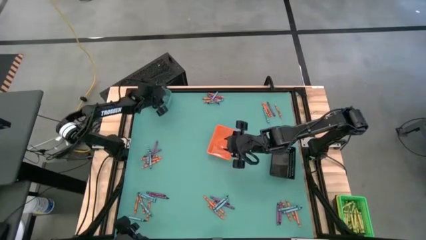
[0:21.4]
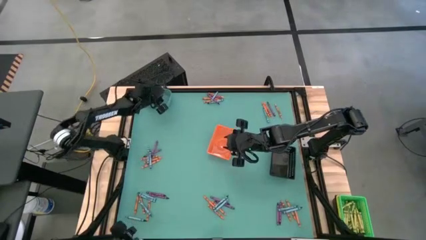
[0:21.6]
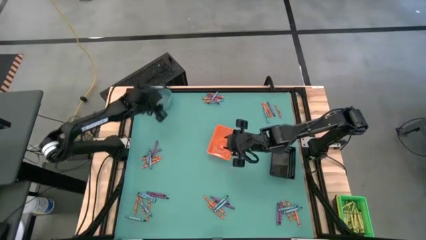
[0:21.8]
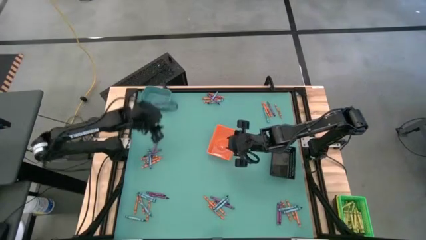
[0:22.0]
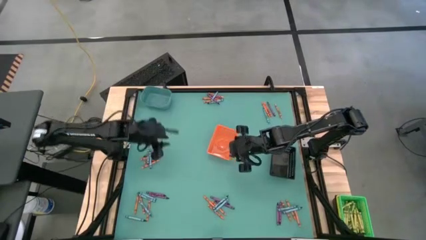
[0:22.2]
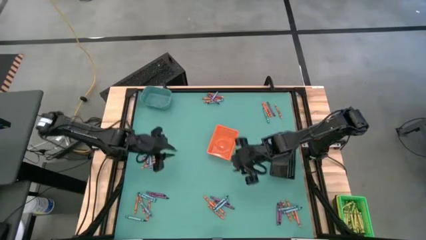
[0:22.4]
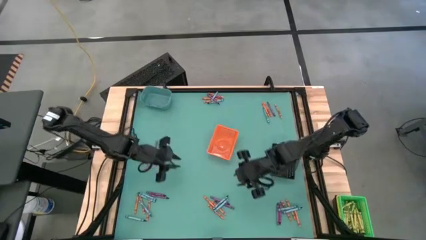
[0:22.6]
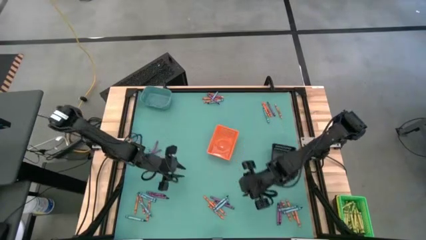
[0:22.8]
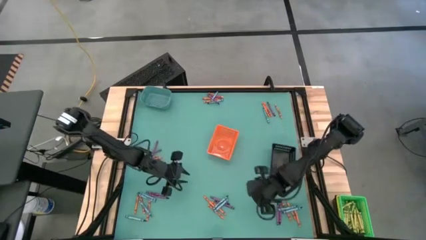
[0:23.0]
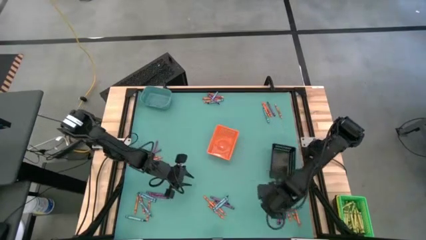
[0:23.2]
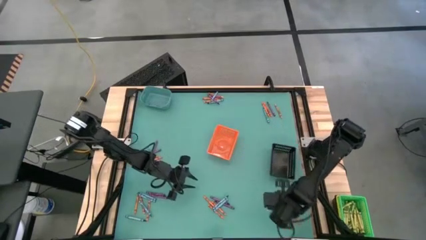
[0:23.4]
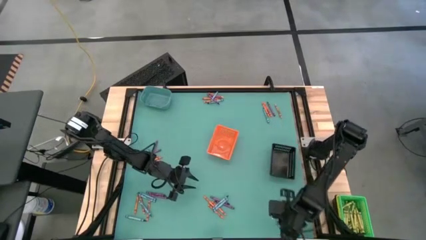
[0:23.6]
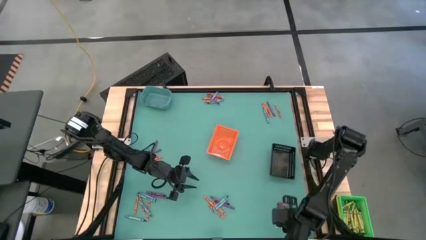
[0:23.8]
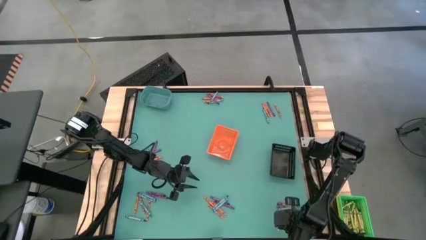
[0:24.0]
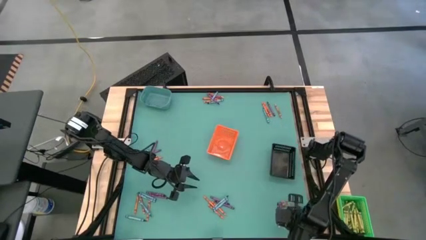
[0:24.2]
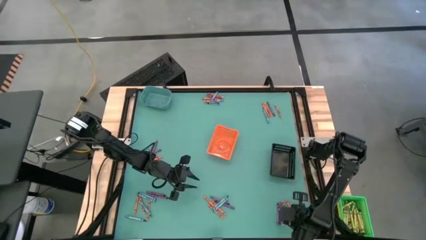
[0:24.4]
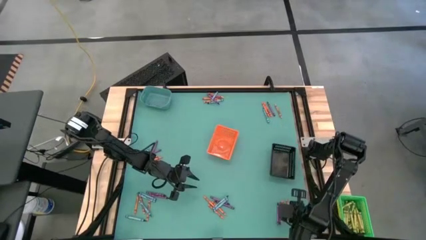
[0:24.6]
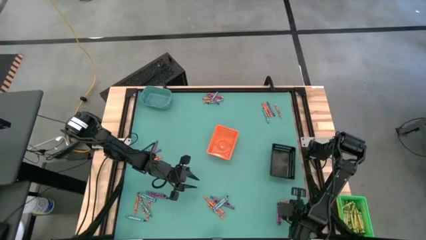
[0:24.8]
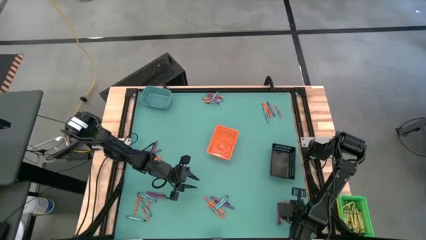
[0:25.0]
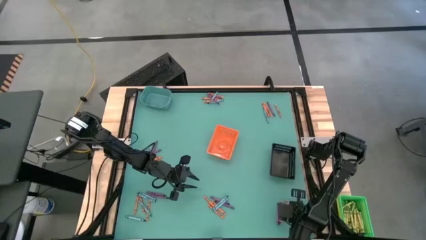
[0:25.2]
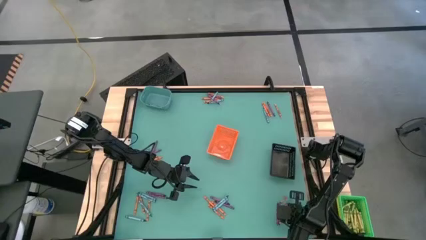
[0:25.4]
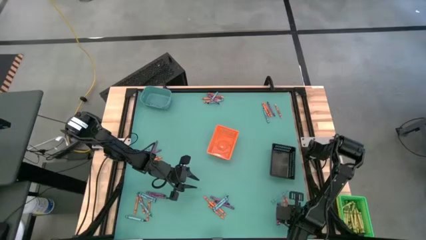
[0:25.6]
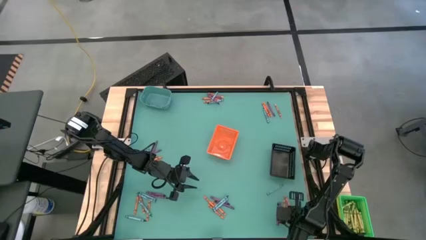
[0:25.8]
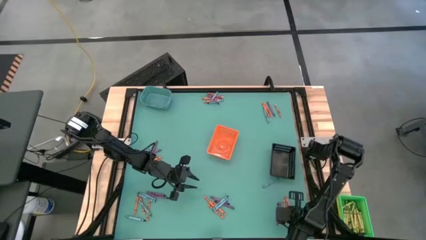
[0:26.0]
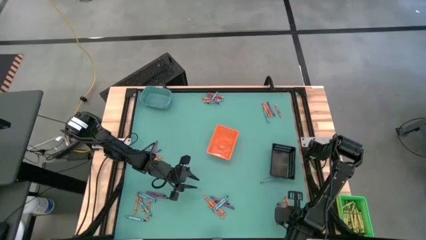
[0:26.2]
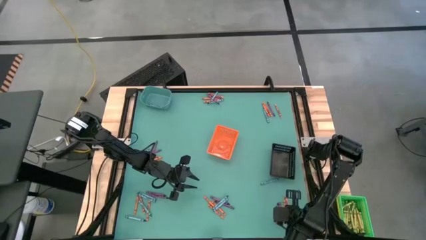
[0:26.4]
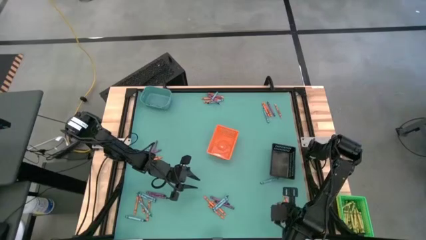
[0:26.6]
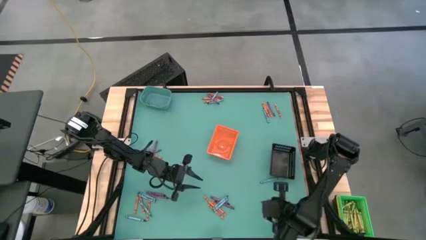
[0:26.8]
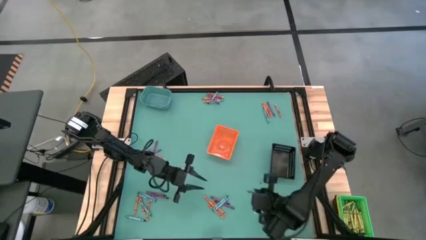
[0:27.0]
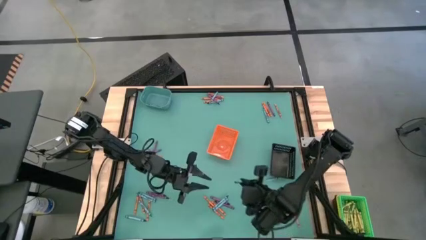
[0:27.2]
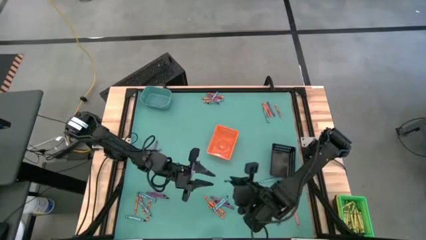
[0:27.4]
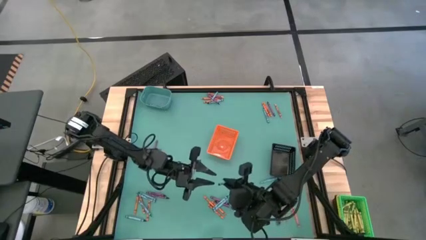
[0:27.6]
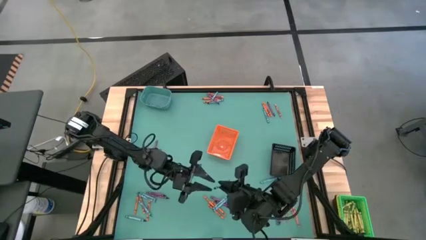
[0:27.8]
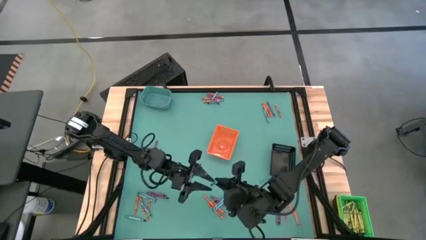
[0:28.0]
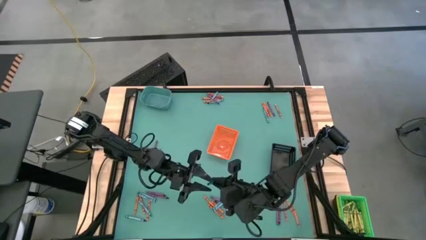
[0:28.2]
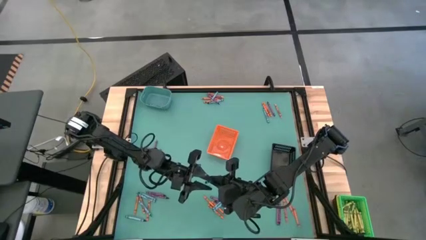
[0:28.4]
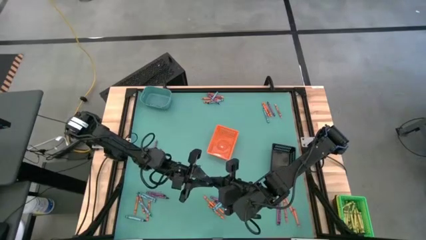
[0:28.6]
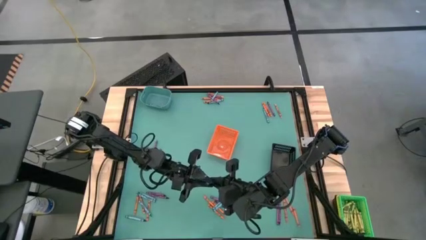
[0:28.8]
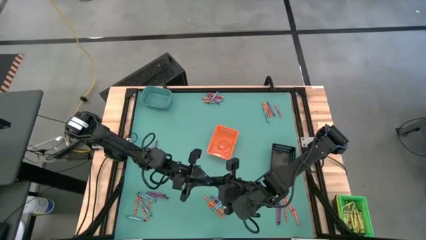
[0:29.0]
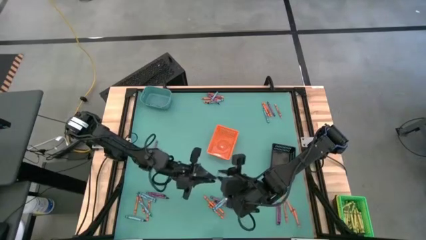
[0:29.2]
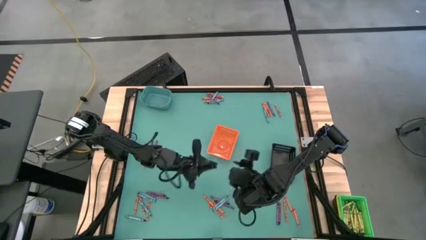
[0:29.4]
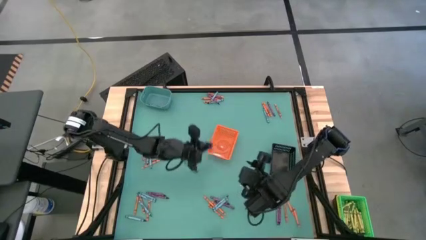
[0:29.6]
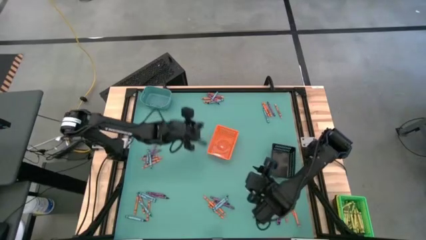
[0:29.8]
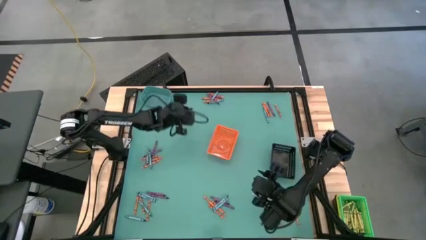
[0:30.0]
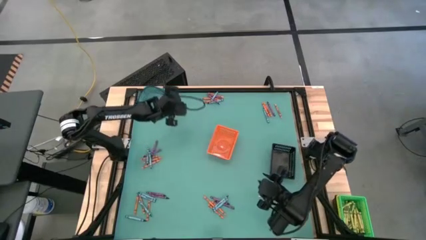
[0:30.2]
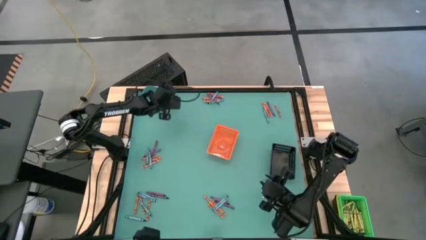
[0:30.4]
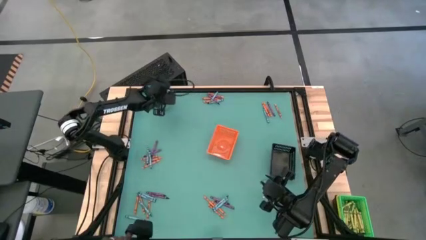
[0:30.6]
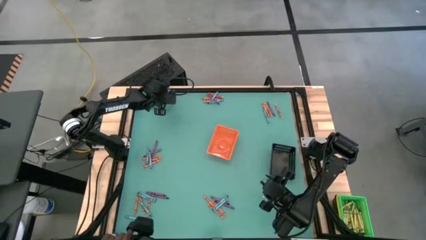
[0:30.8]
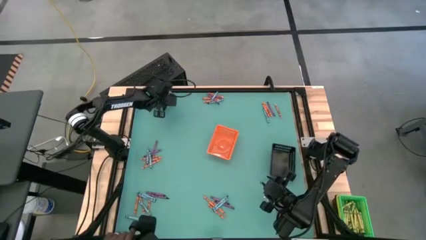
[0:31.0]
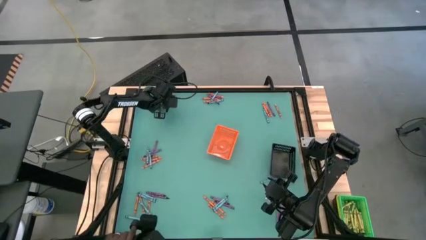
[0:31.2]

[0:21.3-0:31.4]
Task: Sort crayons
Put the blue crayon into the blue bin
